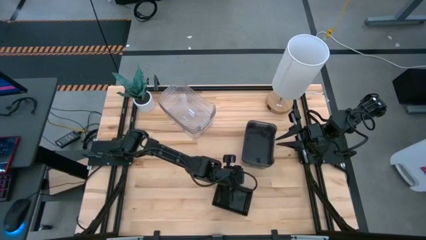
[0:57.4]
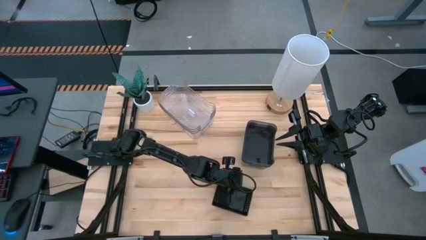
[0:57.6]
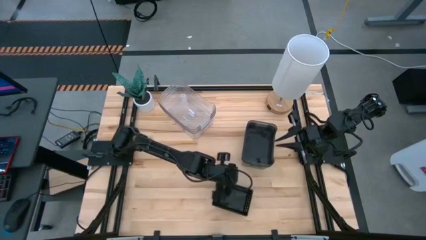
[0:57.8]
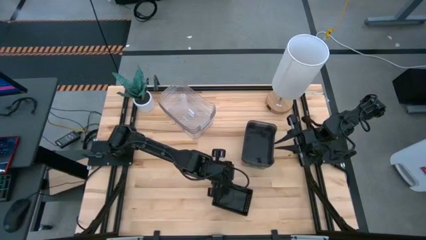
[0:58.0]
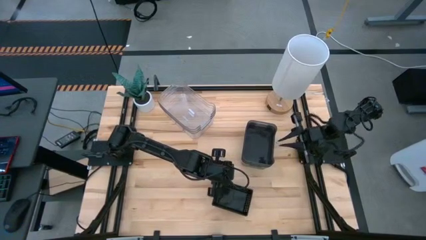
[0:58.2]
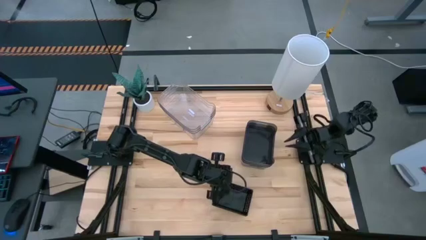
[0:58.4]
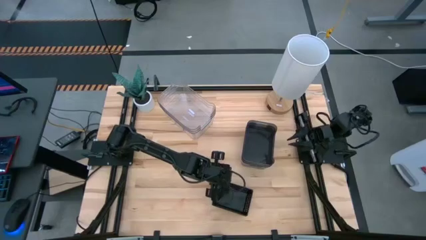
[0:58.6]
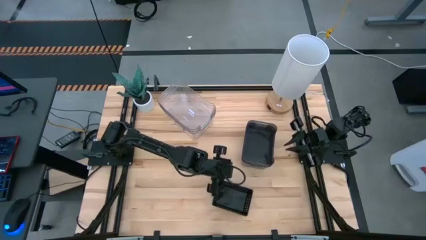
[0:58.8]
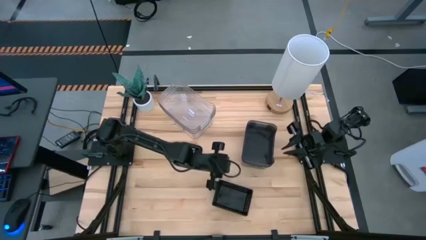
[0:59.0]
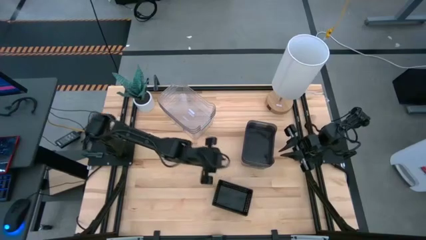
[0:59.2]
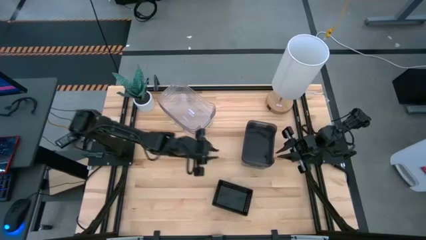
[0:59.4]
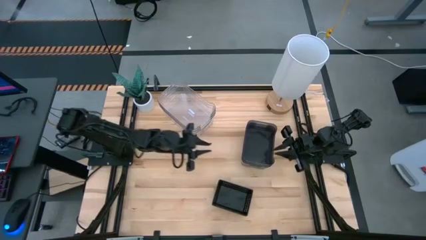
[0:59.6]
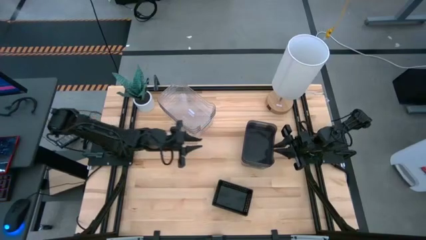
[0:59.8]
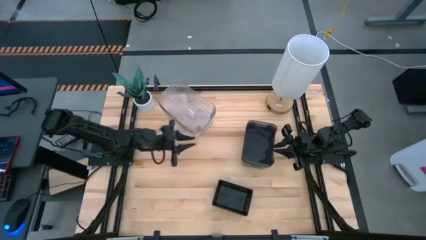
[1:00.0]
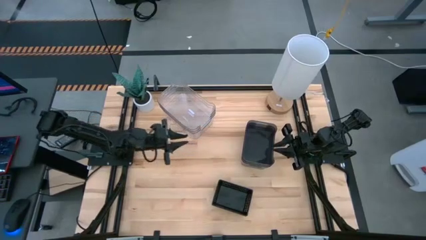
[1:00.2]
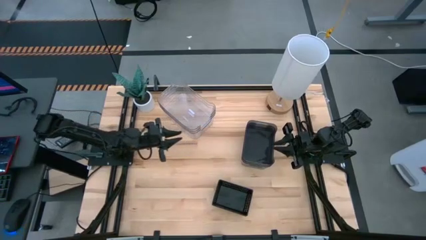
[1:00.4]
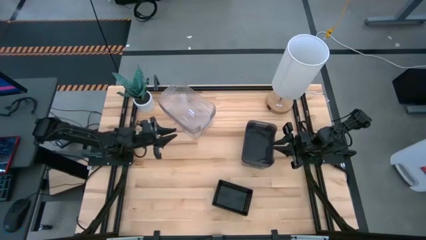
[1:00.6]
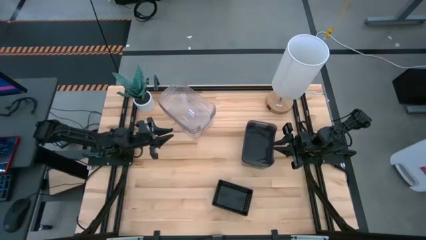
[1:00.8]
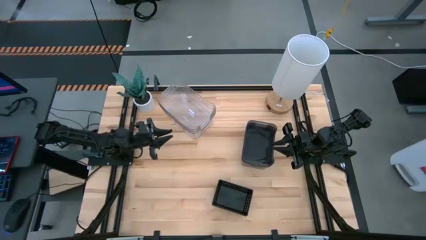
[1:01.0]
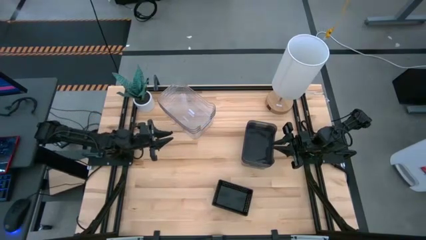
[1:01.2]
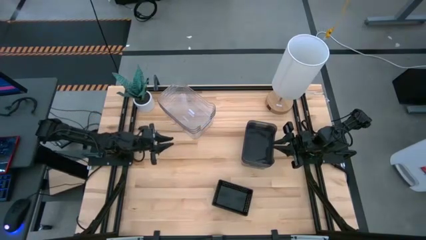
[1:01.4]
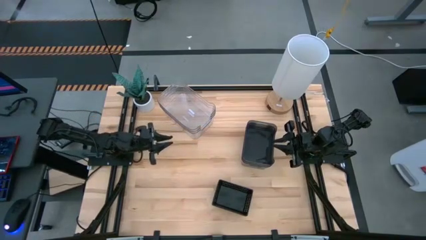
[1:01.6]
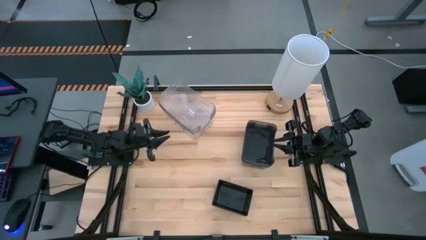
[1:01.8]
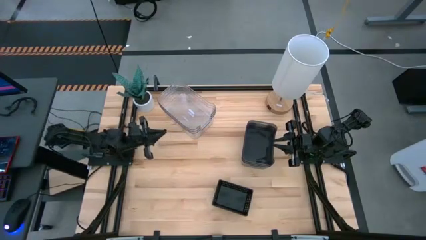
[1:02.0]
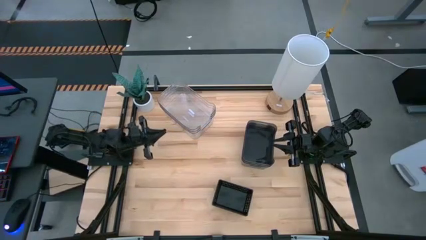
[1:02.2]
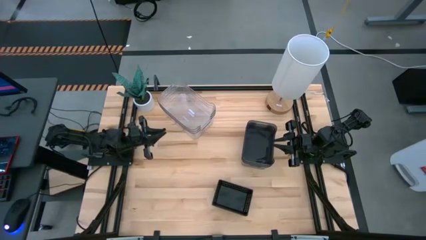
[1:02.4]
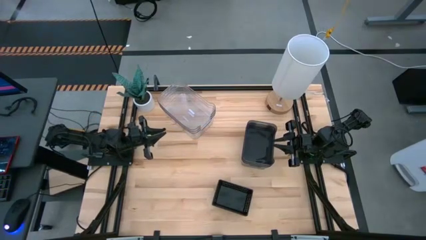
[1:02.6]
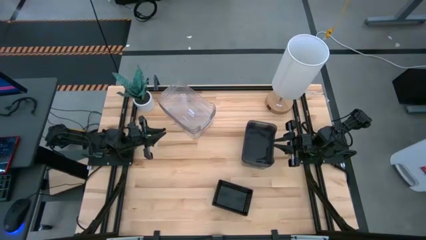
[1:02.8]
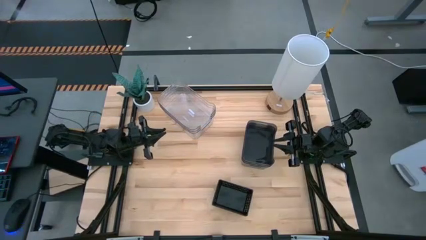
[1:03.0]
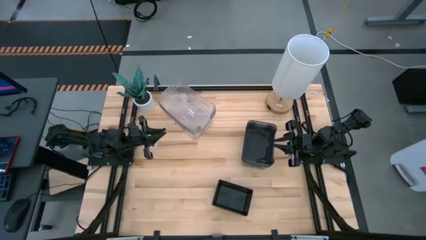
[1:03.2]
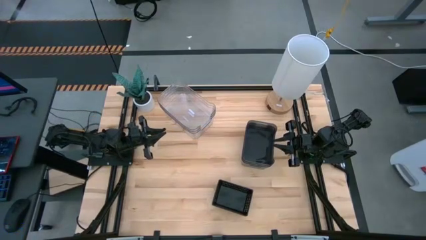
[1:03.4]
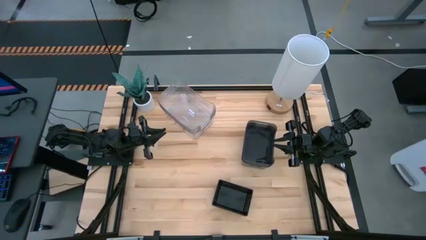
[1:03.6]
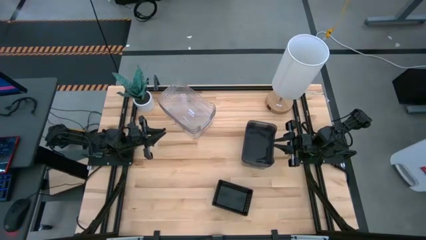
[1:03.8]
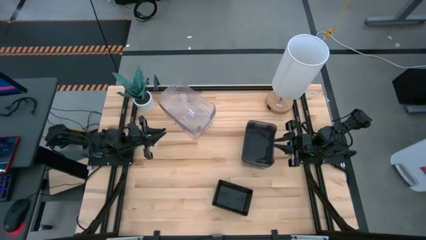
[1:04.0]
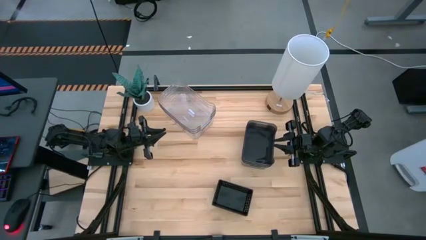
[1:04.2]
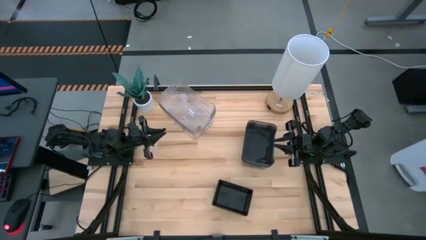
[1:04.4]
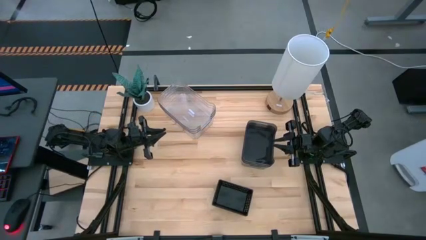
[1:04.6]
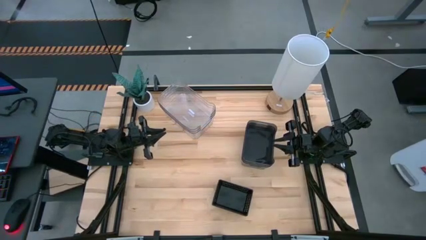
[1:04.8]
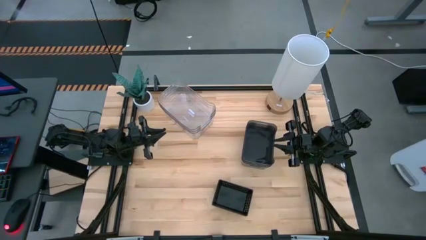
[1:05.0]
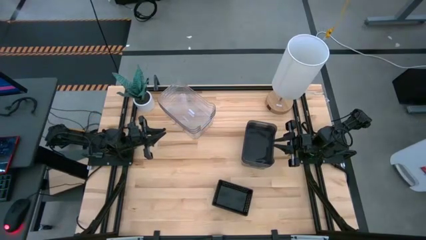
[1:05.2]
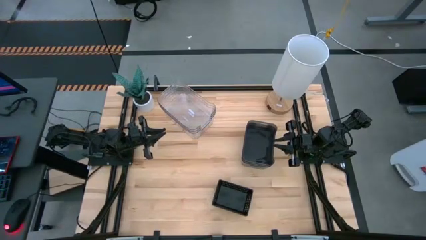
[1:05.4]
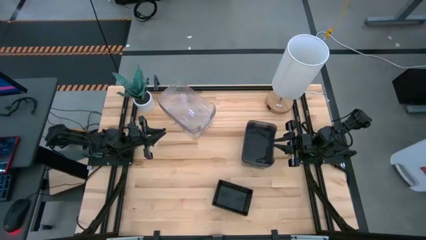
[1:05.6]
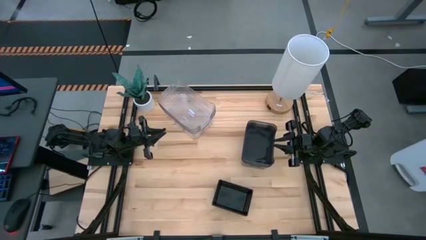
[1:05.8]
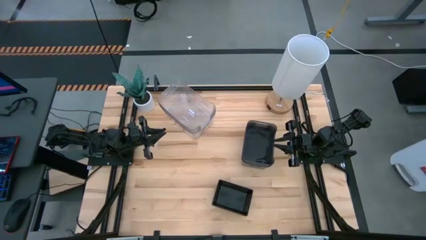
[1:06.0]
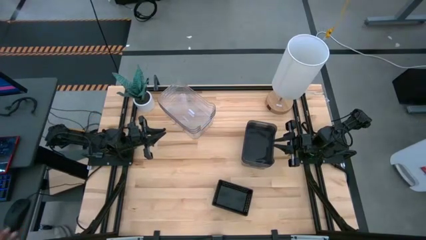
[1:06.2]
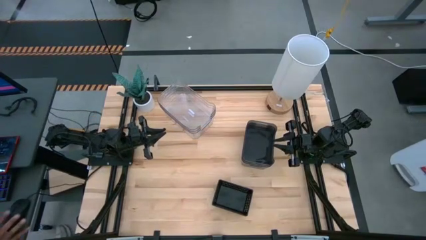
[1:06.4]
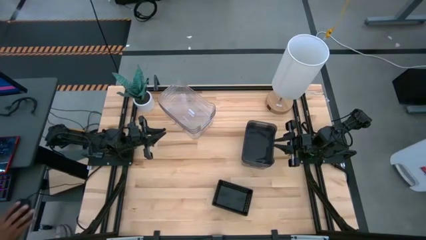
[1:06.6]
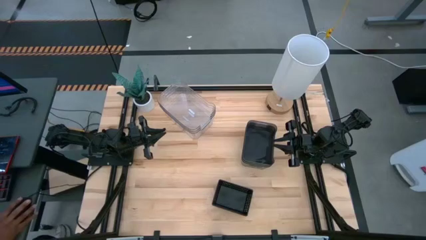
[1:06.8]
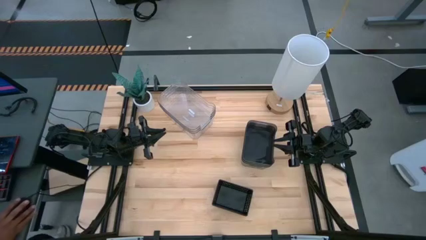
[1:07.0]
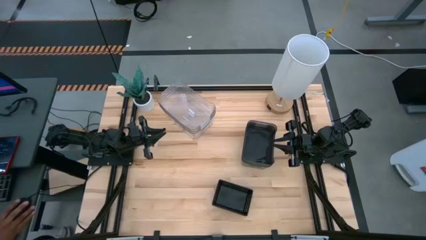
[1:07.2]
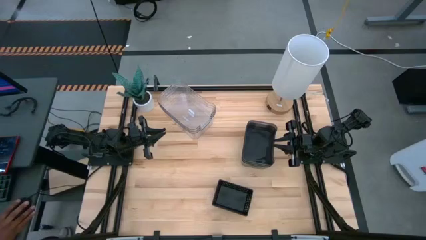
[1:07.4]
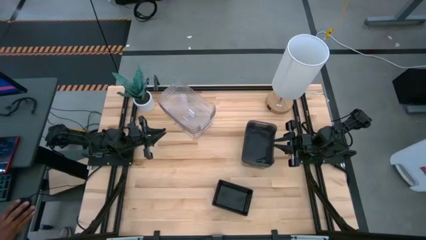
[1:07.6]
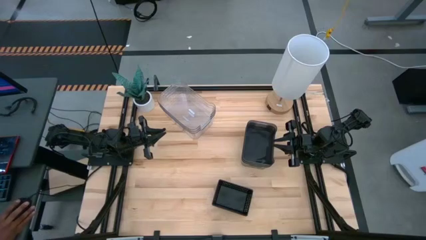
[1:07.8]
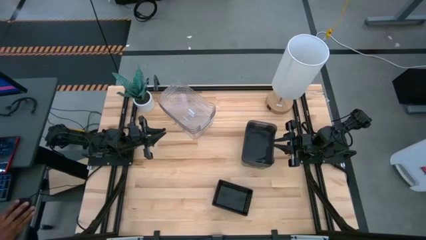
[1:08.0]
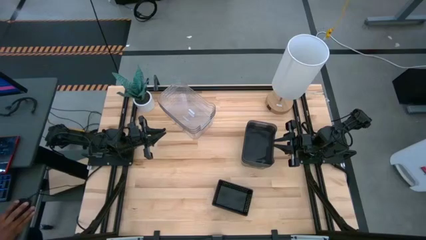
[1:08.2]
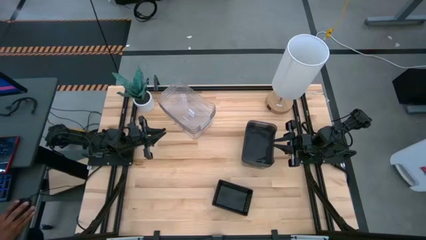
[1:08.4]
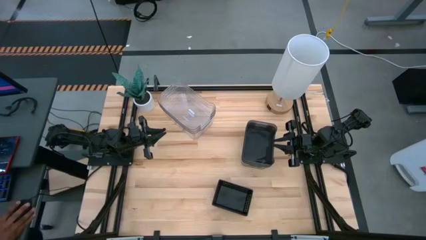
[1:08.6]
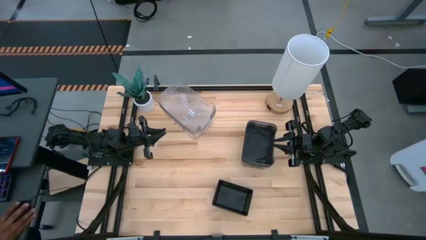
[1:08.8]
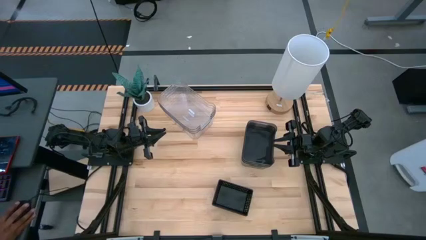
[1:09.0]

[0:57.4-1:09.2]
Return to Home Position
